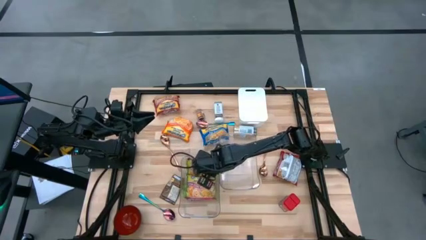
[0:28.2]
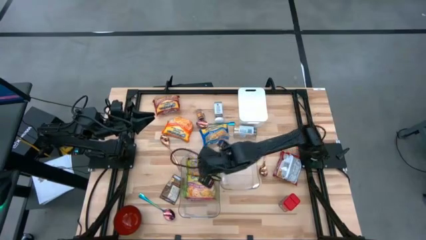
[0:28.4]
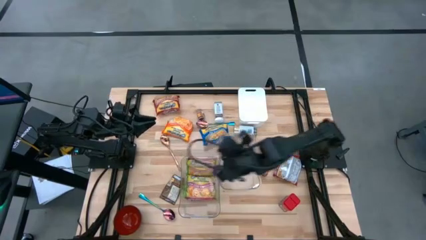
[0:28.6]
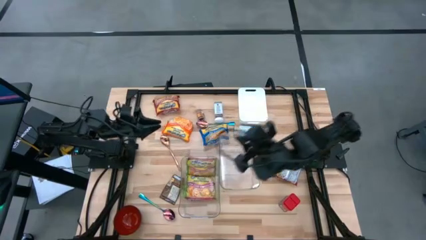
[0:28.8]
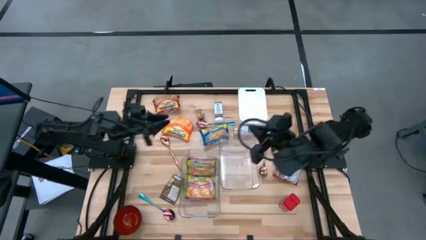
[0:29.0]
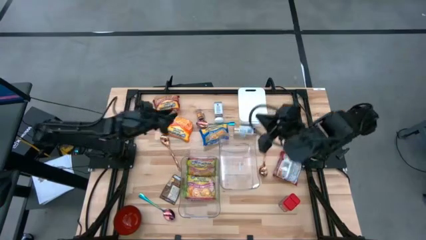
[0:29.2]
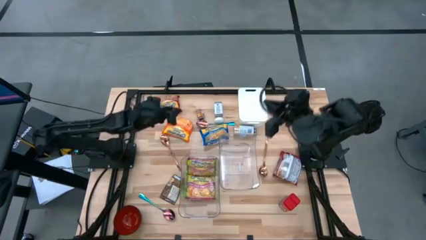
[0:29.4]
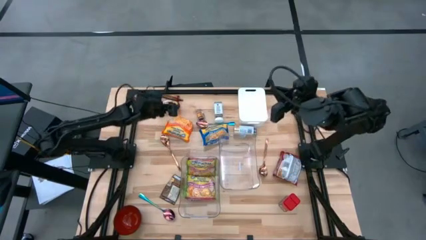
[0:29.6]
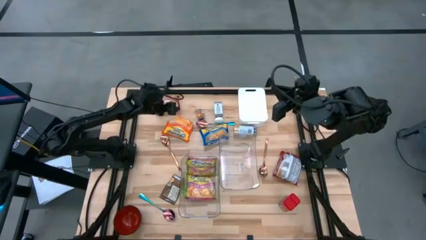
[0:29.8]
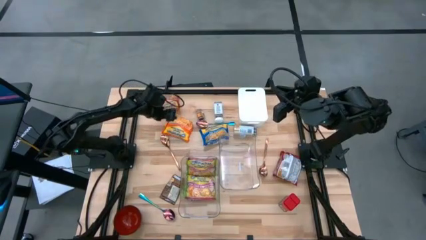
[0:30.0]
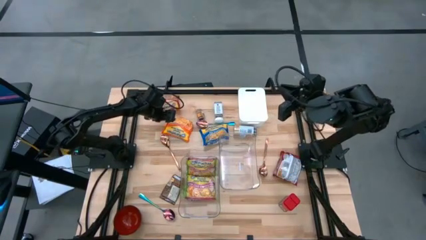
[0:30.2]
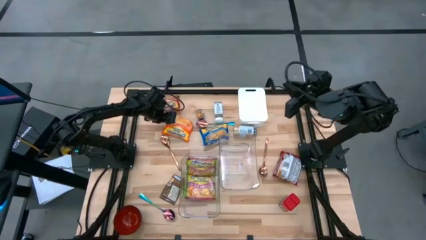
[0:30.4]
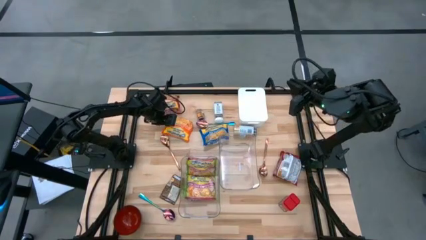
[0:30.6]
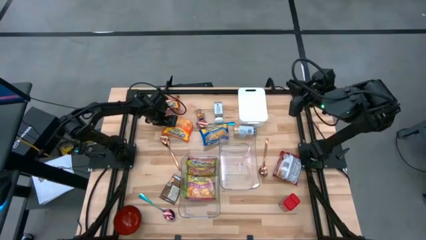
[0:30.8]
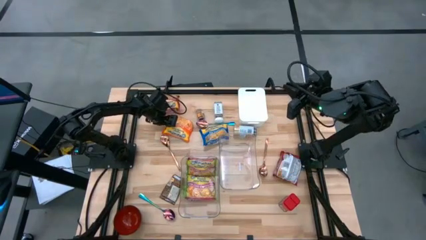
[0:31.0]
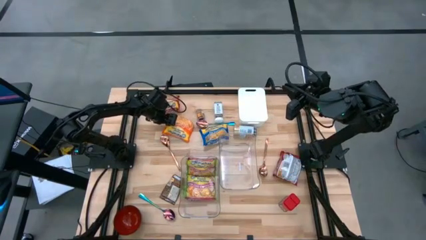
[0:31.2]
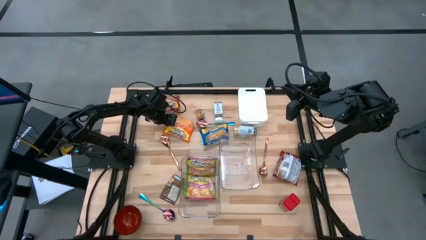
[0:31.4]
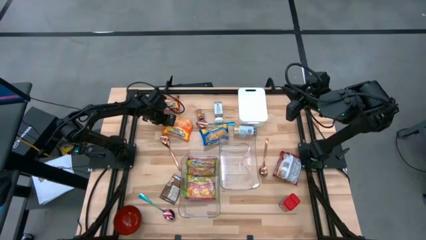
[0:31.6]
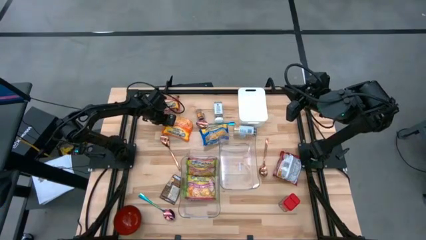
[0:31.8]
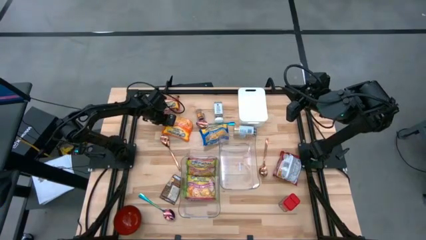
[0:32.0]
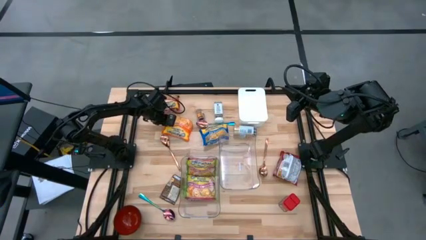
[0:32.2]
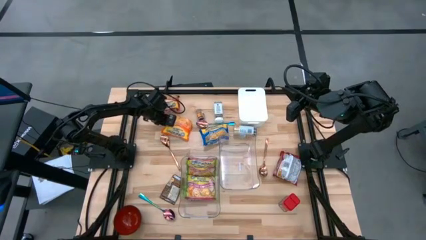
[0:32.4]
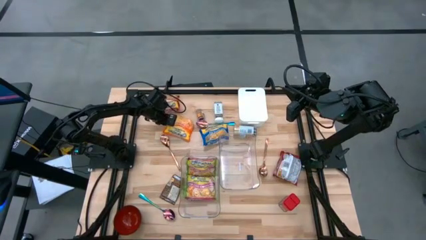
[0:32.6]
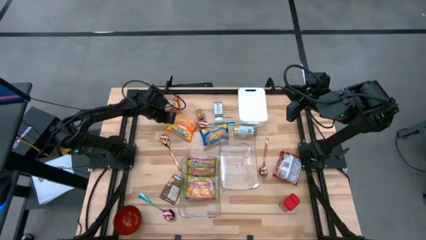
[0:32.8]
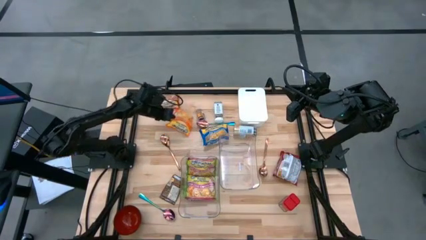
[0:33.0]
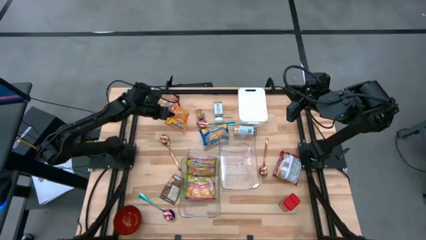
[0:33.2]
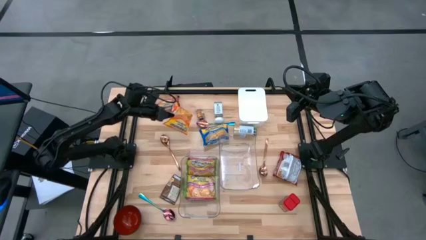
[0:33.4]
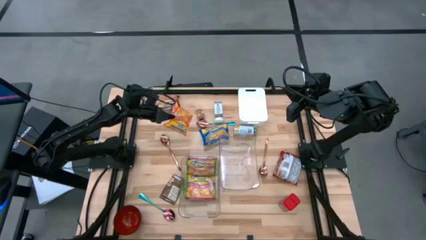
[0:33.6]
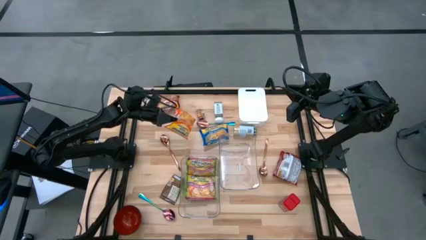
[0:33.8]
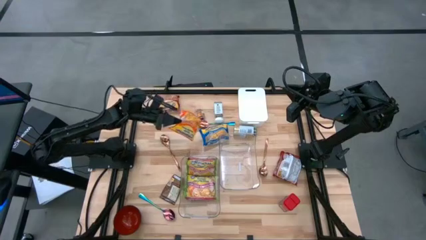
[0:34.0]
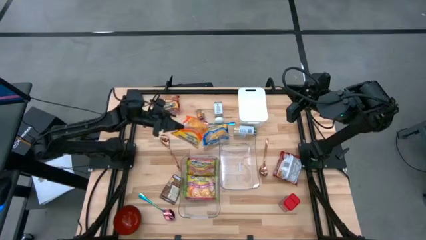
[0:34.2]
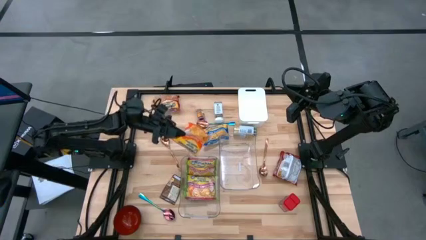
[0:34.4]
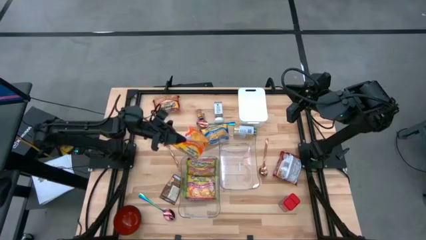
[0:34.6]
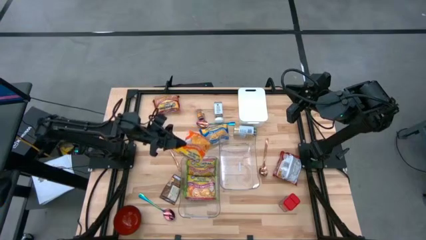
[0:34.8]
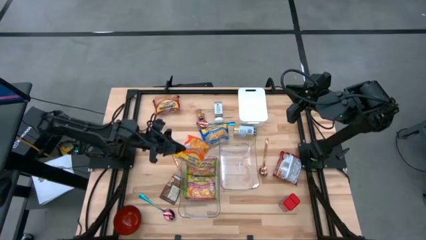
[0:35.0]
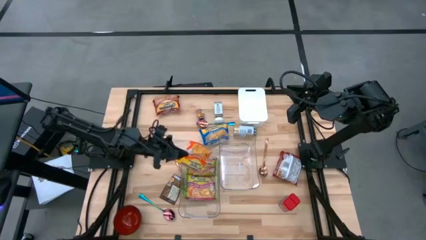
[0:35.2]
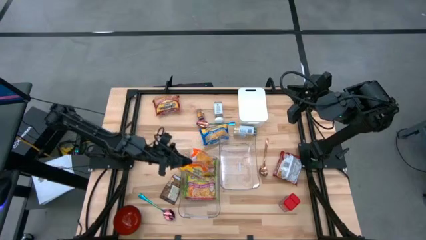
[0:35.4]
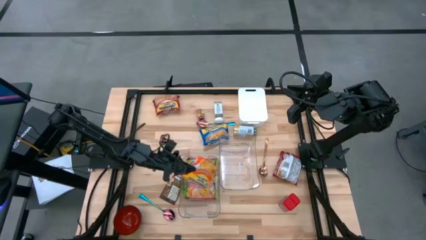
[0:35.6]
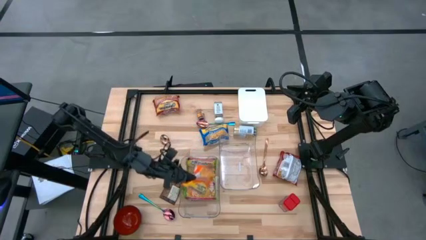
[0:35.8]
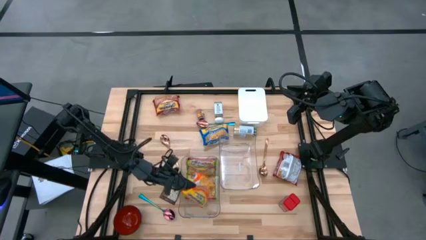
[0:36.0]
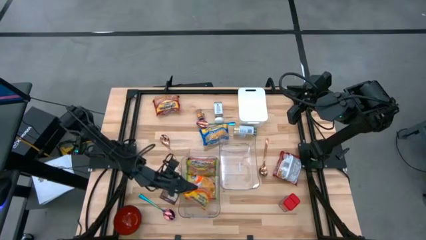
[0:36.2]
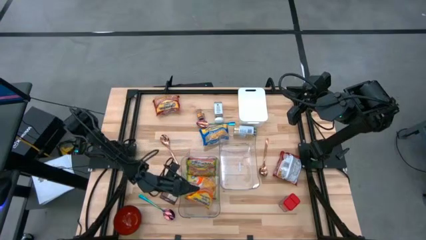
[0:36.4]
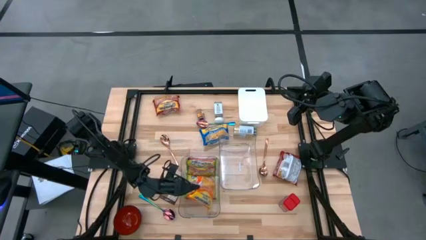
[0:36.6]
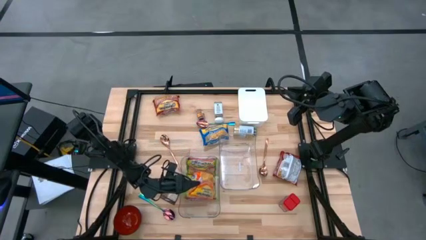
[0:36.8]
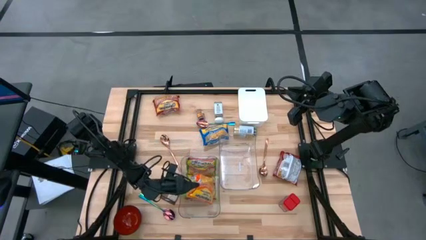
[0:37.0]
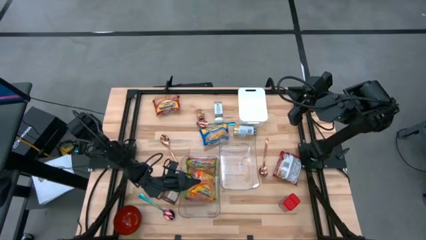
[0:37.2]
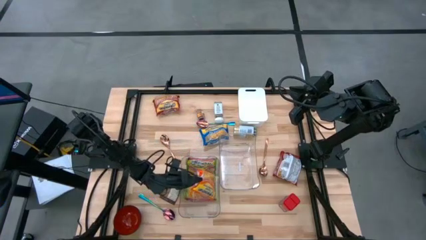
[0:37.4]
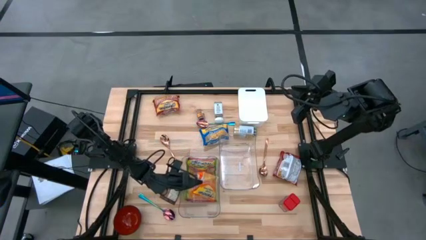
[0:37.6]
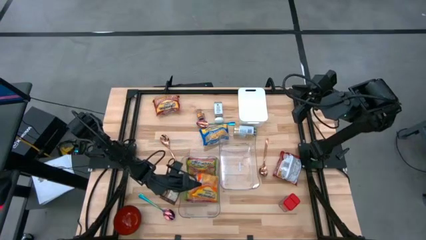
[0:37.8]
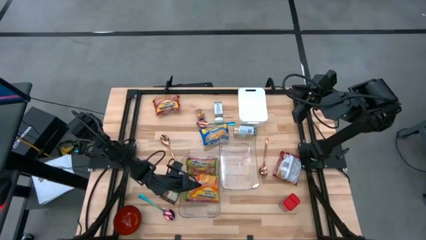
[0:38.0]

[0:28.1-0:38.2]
Task: Pick & Place Food Item
Put the orange noodle pack into the left transparent bin

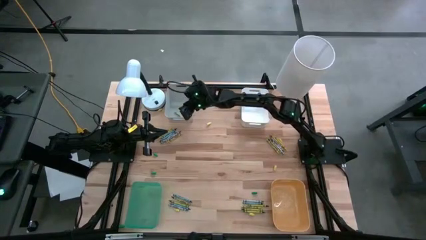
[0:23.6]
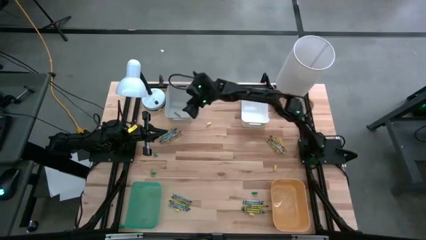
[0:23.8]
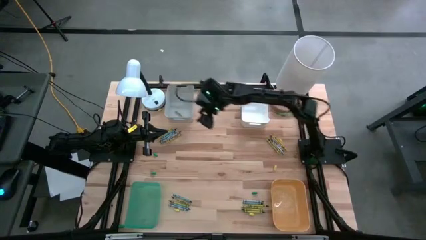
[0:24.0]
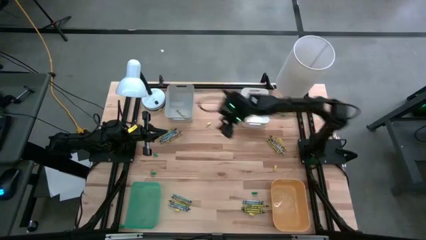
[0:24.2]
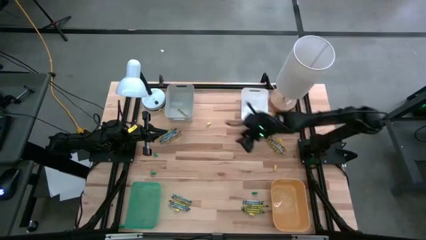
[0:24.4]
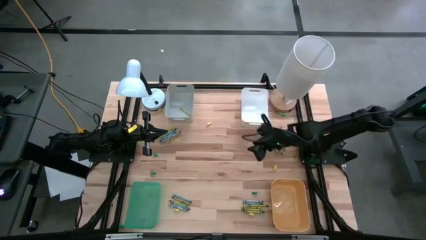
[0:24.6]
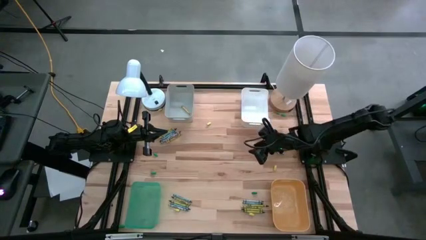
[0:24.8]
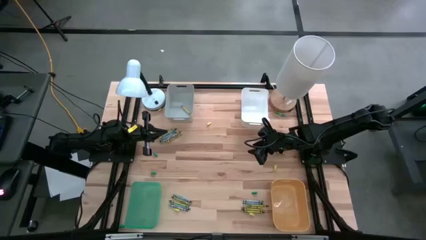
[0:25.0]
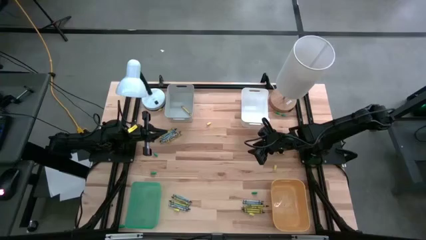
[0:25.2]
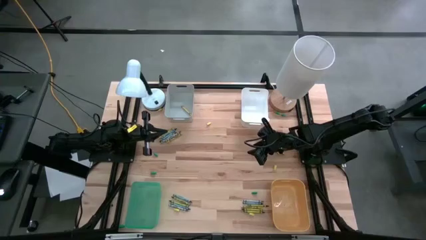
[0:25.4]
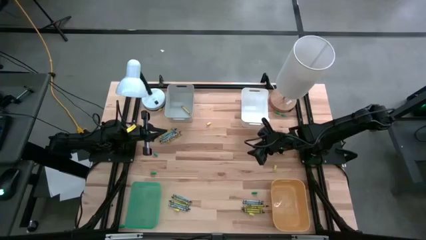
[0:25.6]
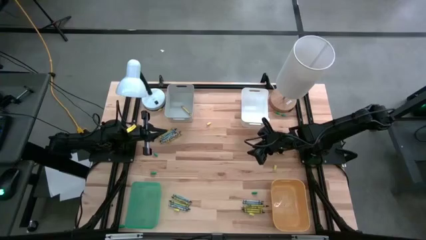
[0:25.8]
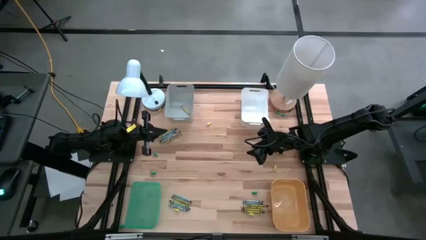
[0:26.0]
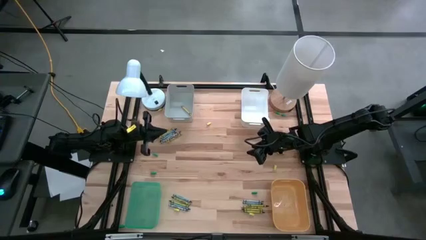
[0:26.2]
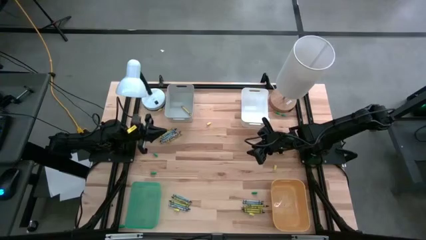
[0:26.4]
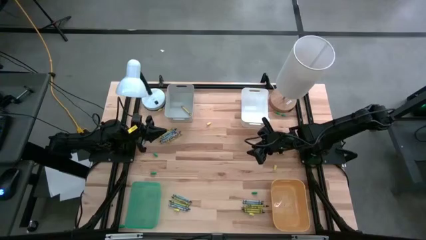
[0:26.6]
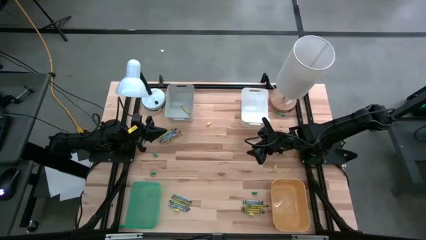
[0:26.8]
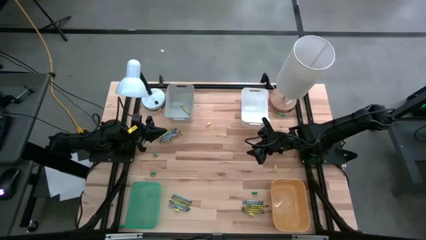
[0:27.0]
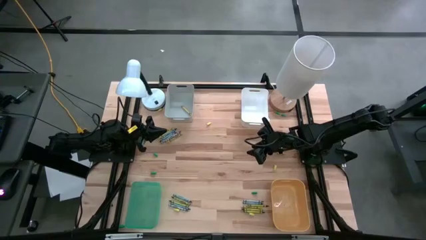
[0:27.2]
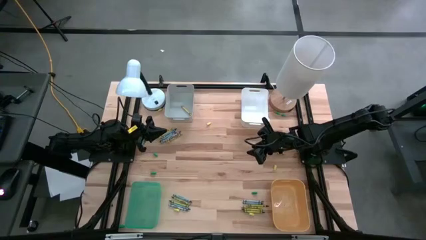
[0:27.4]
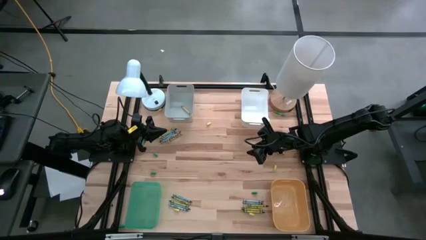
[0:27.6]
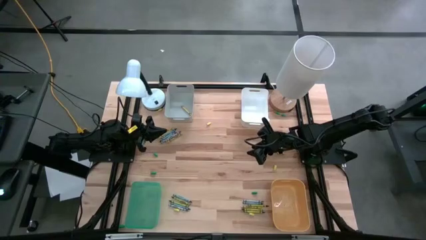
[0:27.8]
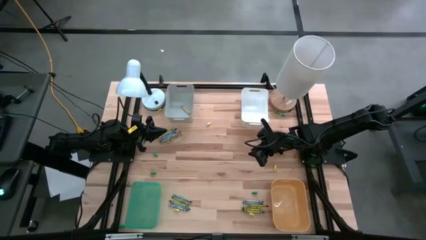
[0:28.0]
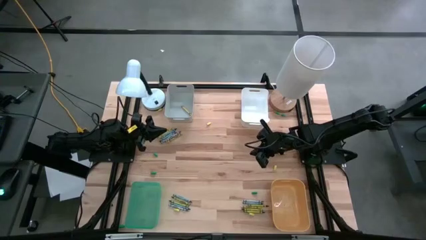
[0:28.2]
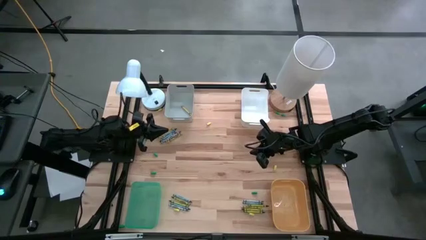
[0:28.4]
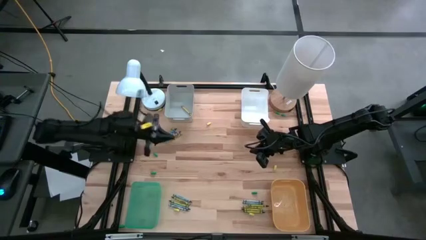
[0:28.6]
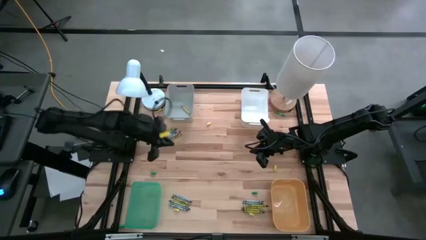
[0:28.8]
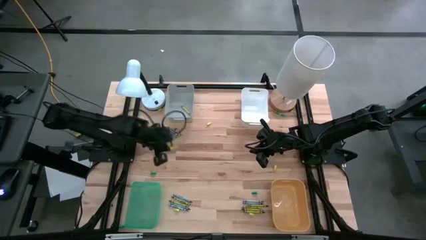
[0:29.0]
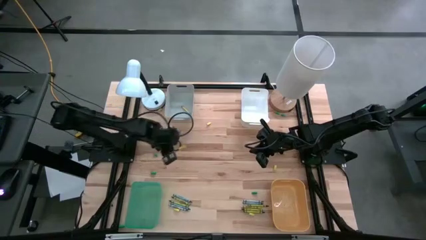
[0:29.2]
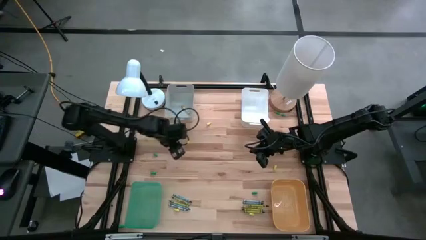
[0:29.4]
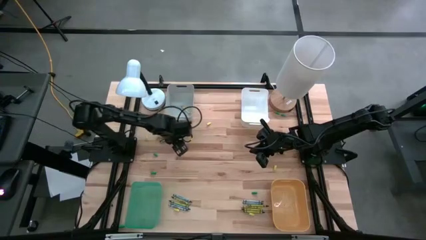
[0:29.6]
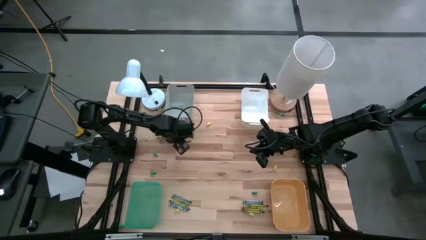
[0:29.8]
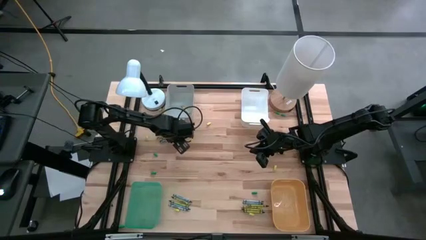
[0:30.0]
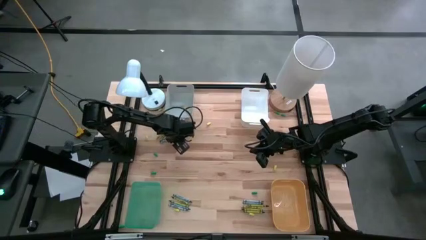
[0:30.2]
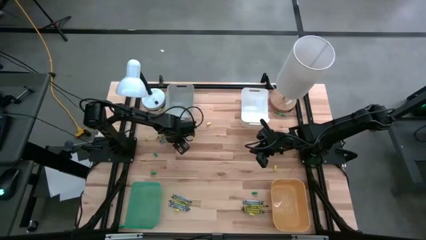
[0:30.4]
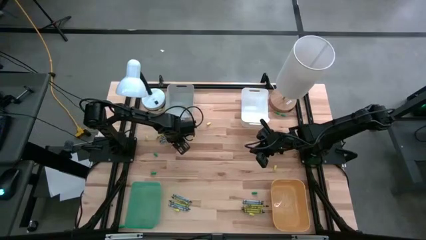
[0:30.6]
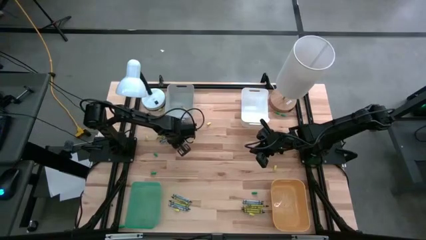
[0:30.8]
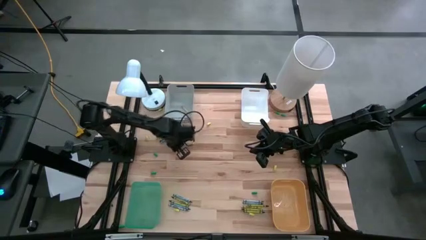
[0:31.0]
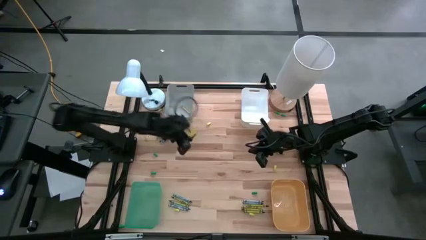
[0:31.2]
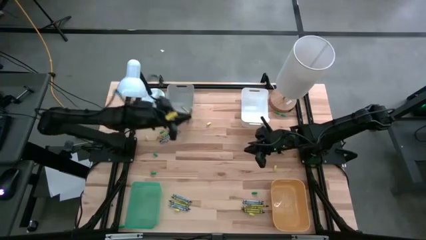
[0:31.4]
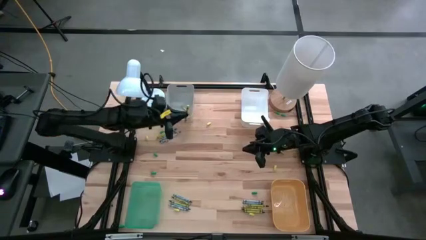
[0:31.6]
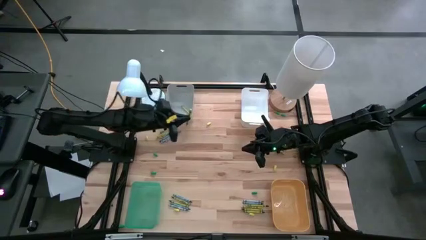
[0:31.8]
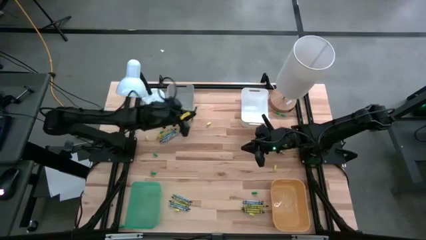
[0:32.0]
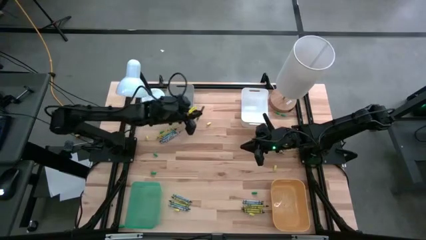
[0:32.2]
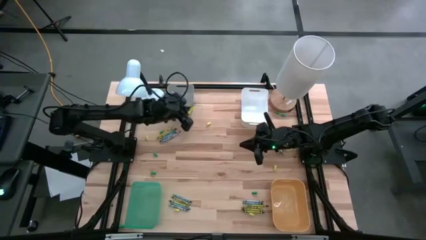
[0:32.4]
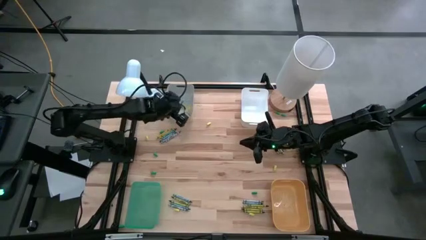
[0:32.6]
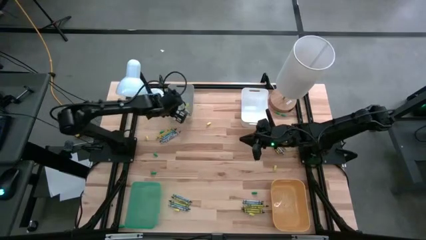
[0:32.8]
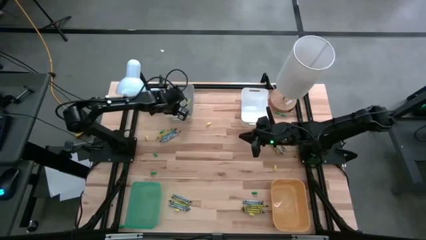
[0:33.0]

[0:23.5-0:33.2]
Task: Sort crayons
Put the yellow crayon into the gray bin
